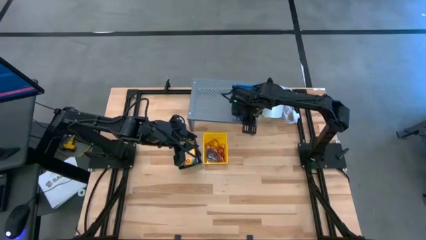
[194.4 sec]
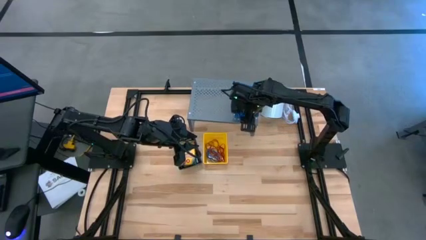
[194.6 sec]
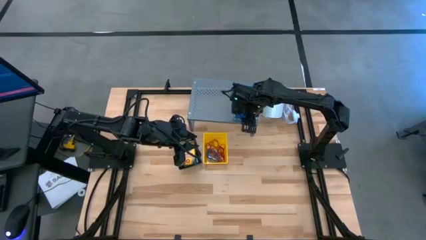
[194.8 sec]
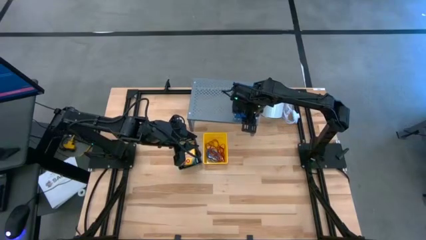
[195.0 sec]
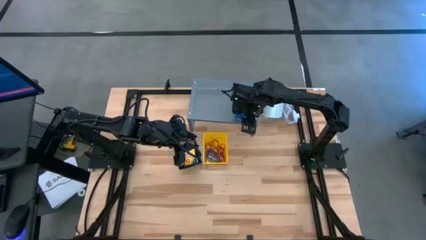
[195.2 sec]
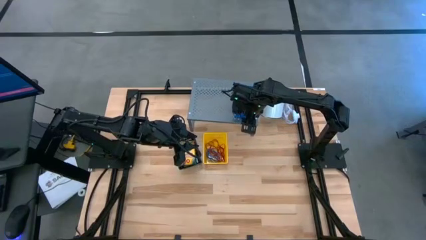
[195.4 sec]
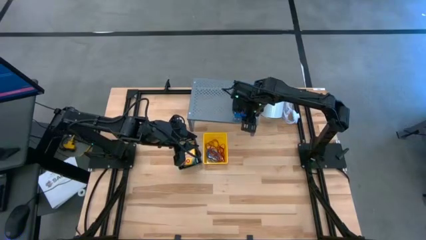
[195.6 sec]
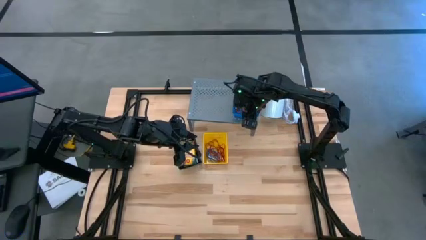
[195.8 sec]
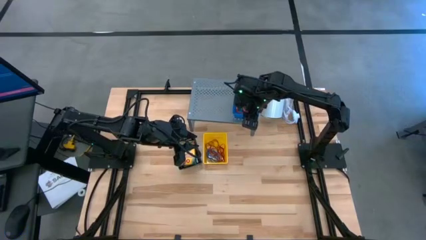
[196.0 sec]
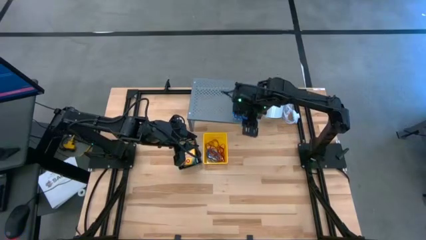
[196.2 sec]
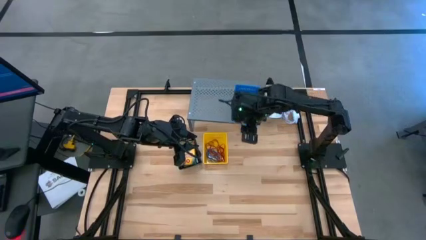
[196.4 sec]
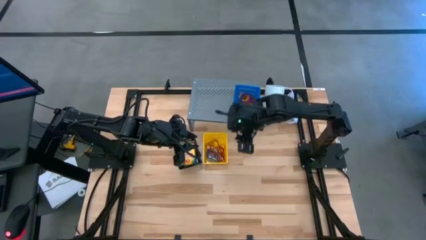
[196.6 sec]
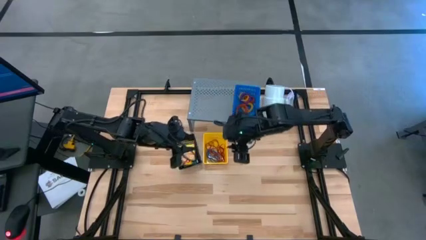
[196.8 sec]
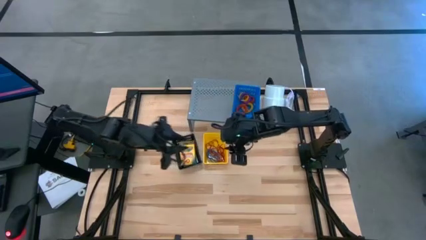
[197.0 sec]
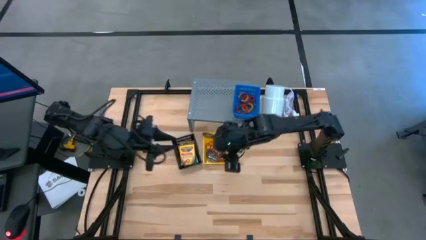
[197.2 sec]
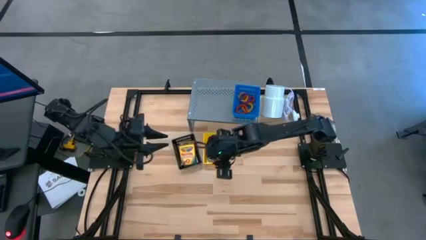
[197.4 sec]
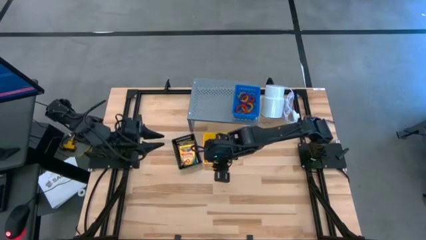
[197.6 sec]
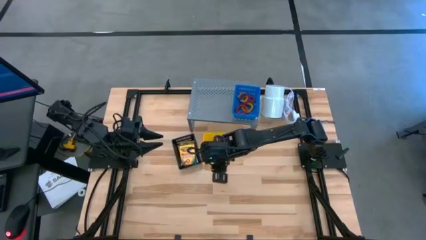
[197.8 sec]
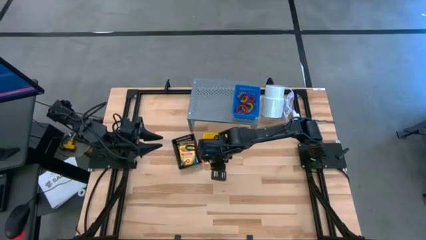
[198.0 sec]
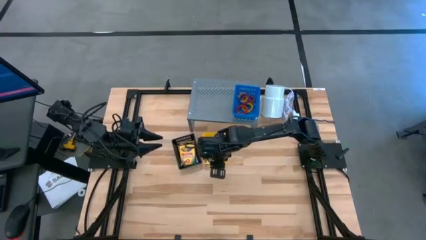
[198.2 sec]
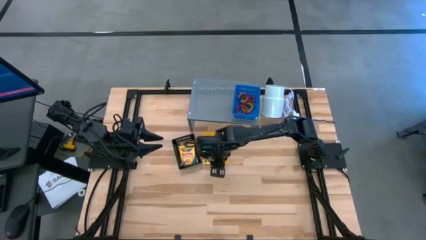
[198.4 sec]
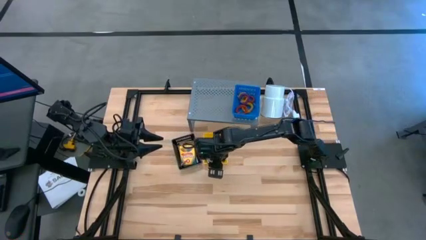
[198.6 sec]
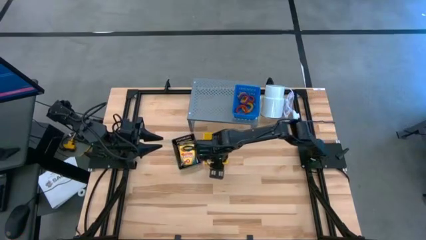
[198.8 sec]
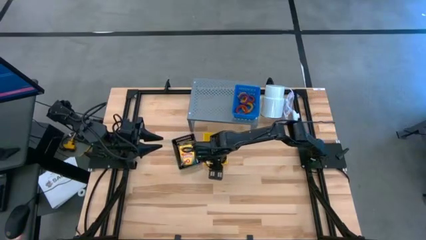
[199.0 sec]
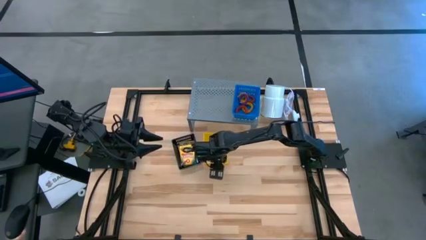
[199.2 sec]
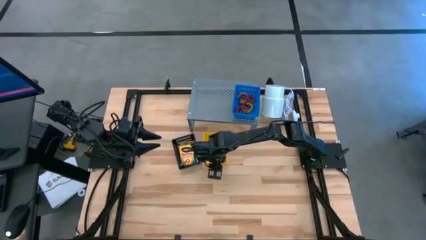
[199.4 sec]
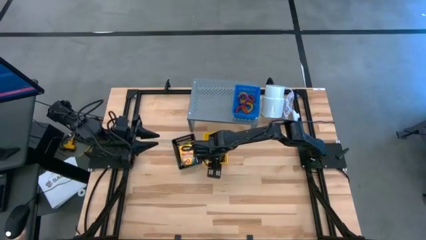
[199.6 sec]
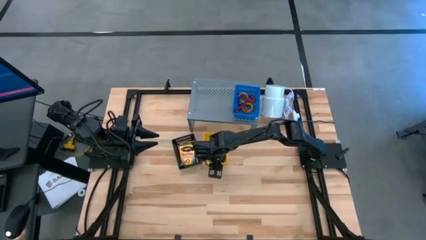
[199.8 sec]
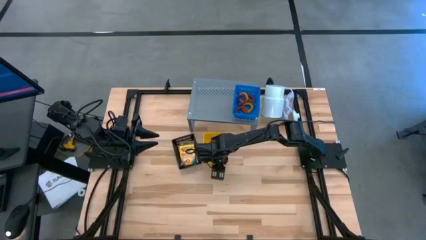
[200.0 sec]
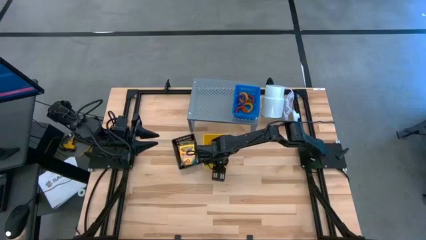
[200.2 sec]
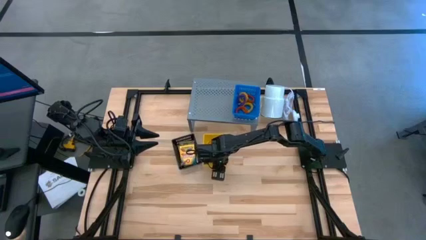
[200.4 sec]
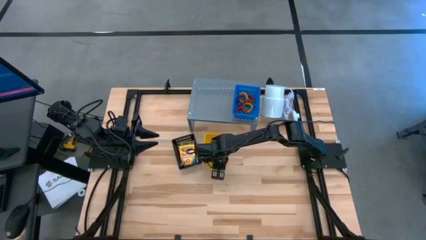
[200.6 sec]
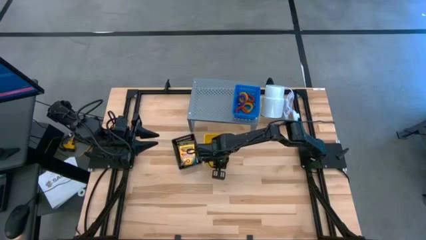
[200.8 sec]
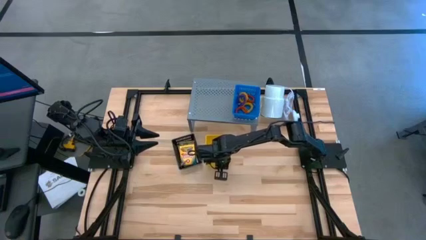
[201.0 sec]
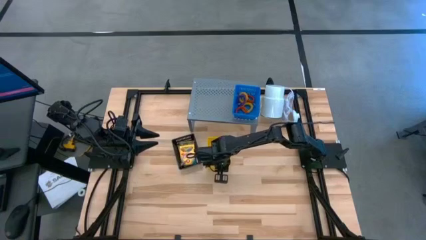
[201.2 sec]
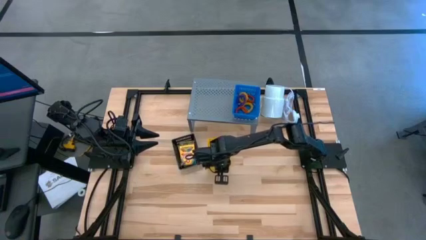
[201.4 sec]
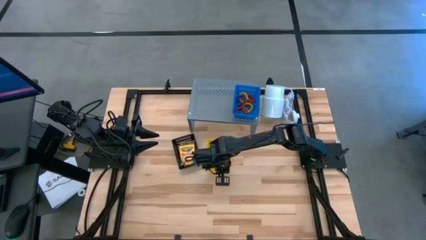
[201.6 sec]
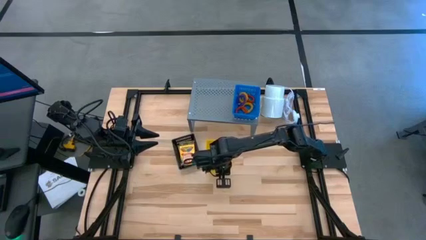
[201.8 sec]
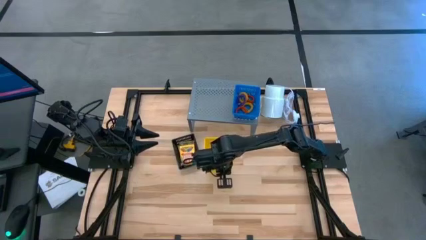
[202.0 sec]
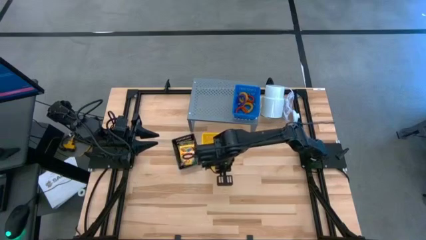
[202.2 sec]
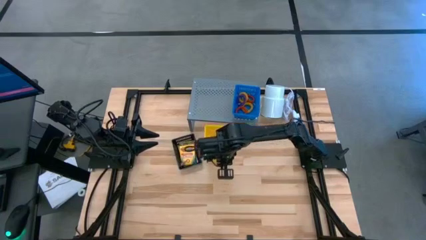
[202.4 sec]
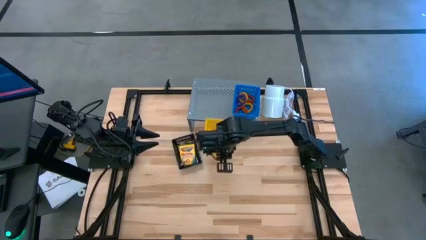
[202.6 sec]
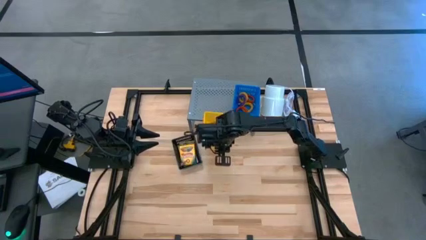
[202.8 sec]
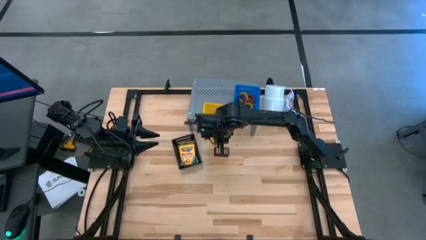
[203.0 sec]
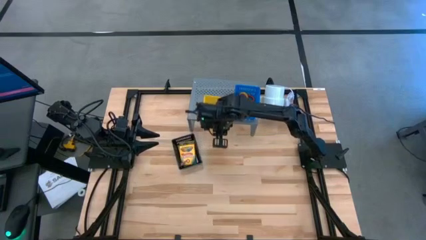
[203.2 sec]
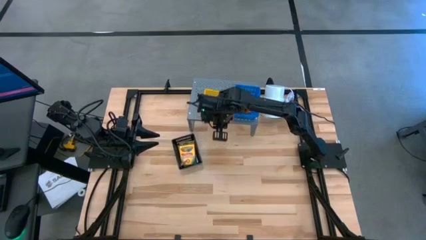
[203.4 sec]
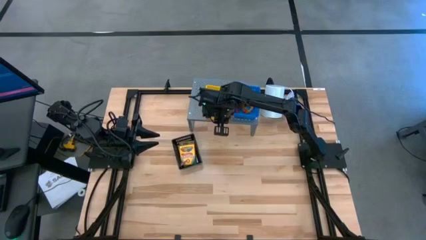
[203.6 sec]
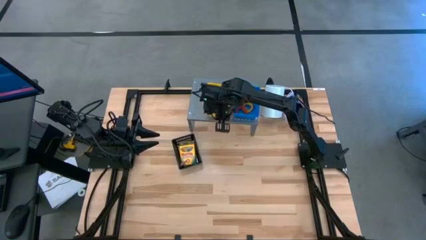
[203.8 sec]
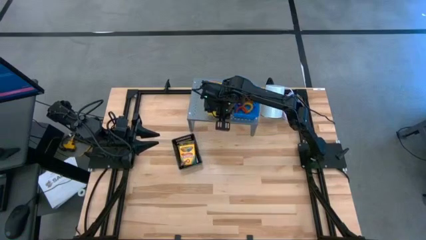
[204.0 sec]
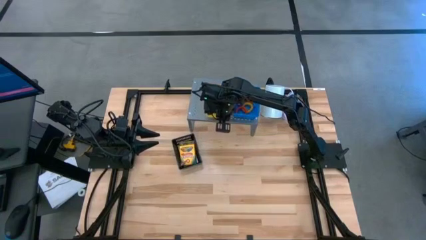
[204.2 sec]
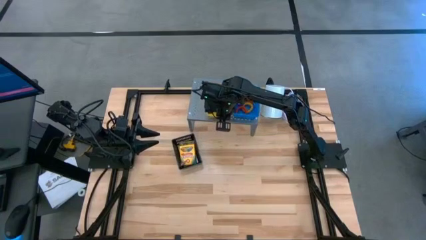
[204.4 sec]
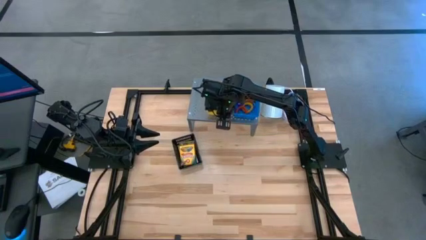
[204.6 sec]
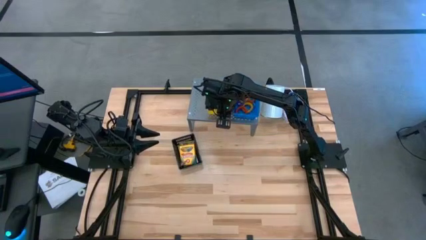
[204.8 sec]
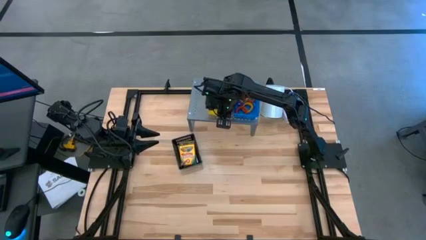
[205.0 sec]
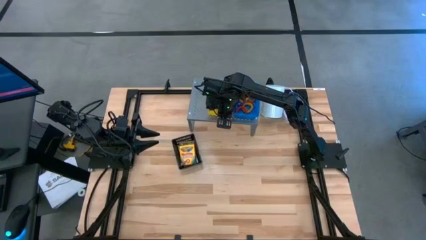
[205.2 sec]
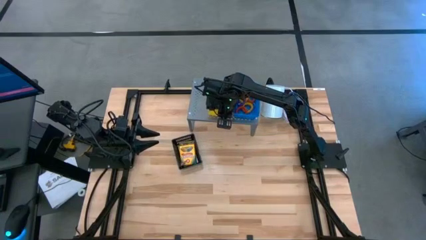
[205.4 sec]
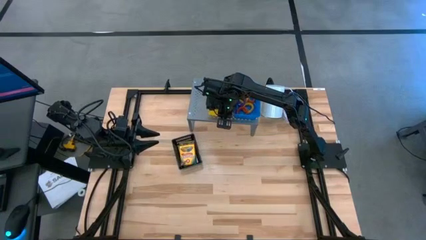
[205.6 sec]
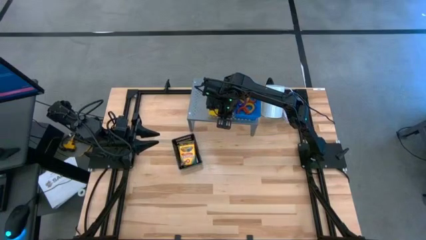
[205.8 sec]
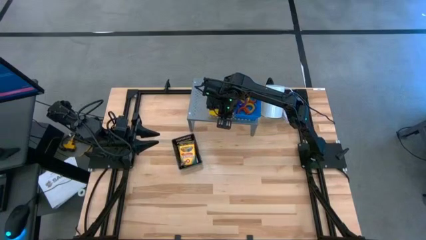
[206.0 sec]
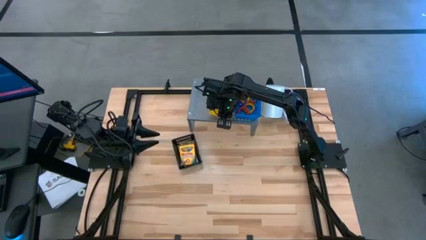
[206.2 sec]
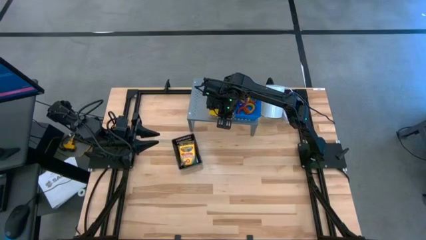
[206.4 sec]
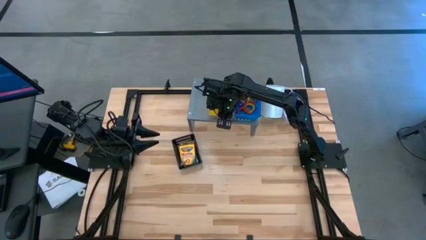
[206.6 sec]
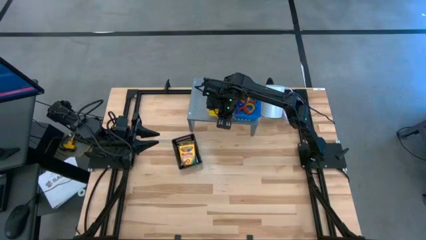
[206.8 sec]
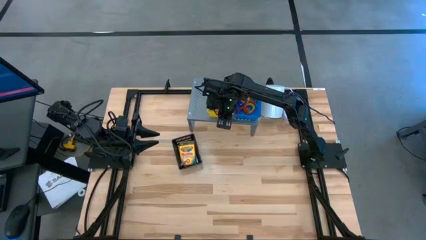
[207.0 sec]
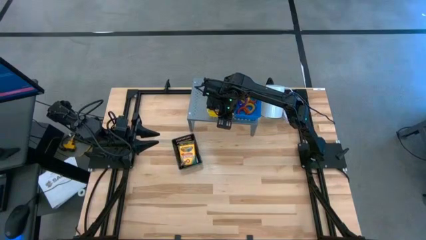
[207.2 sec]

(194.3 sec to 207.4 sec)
Task: Pick & Place Office Desk Supplies
Put the yellow basket on the shelf

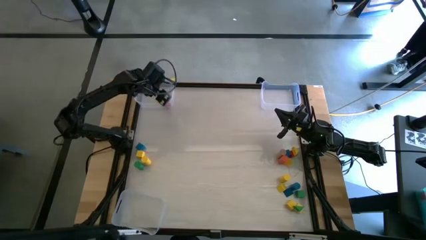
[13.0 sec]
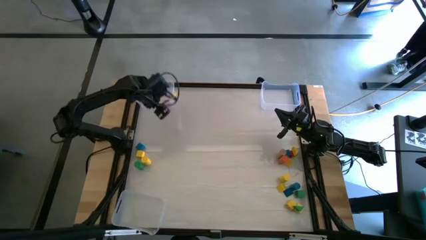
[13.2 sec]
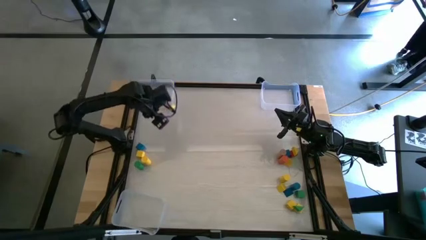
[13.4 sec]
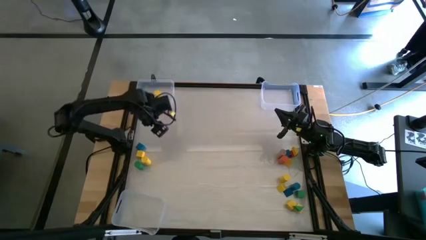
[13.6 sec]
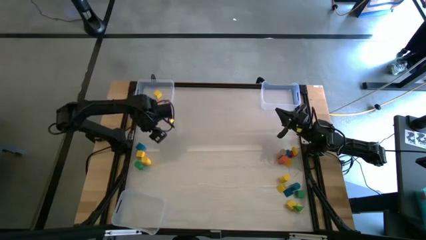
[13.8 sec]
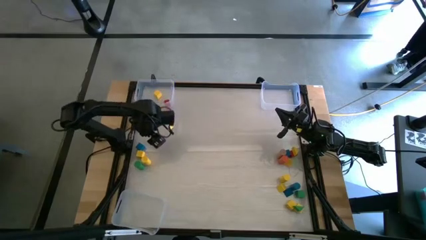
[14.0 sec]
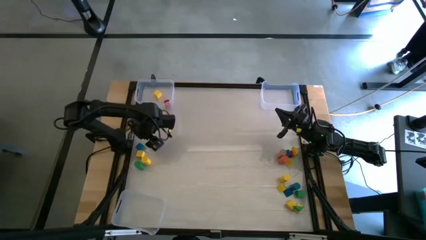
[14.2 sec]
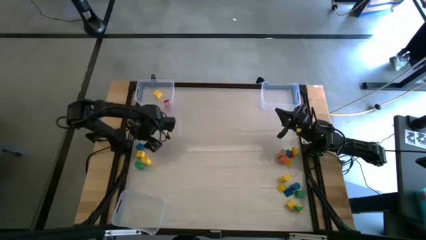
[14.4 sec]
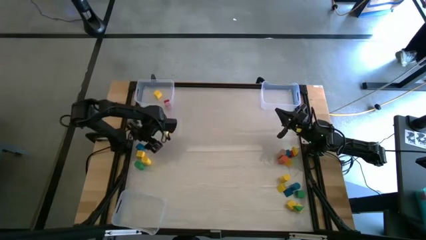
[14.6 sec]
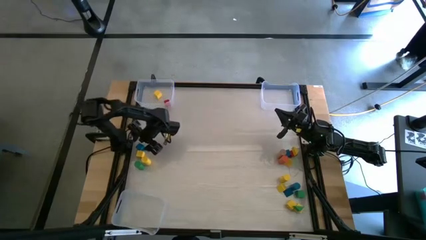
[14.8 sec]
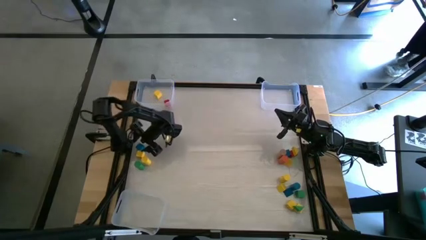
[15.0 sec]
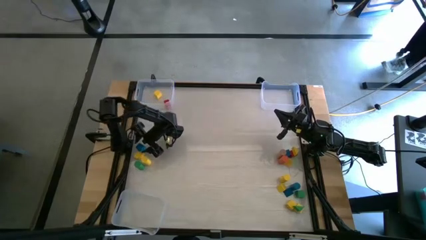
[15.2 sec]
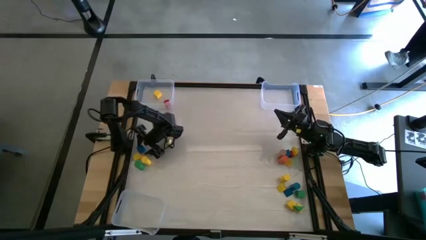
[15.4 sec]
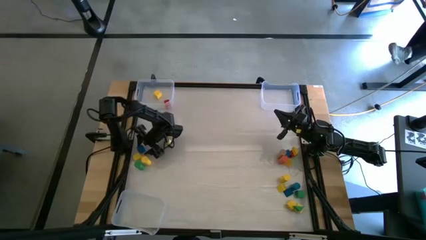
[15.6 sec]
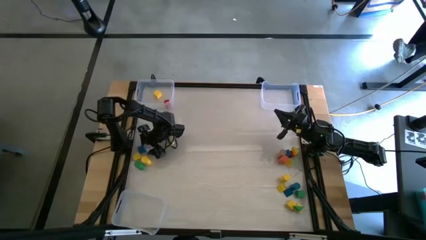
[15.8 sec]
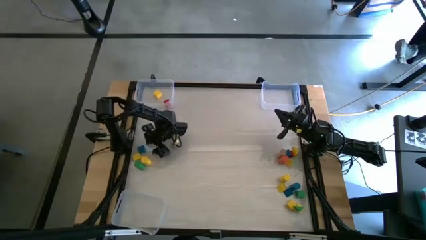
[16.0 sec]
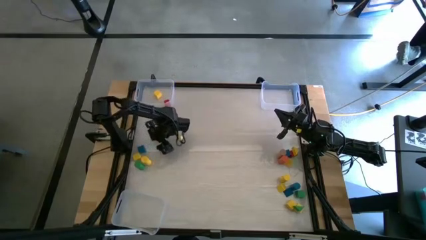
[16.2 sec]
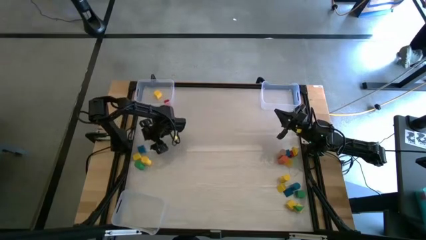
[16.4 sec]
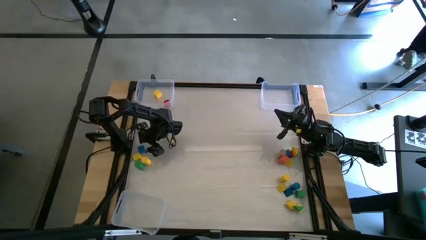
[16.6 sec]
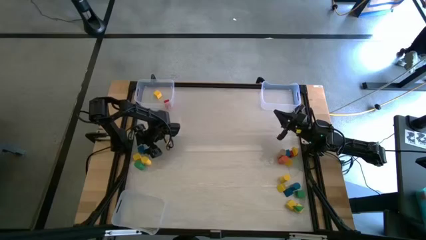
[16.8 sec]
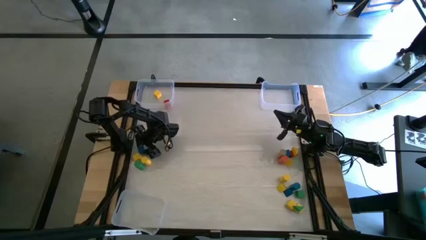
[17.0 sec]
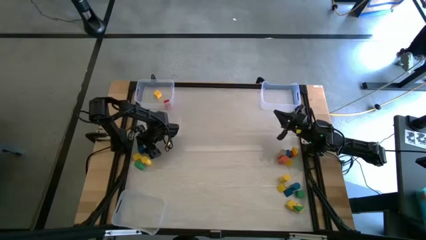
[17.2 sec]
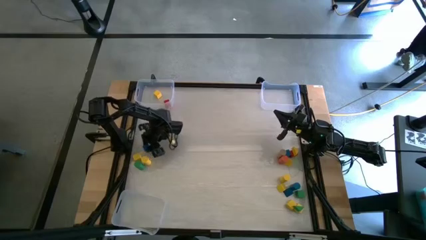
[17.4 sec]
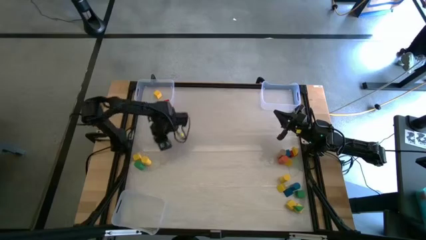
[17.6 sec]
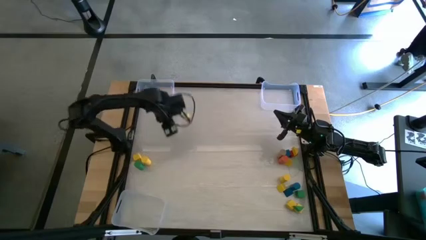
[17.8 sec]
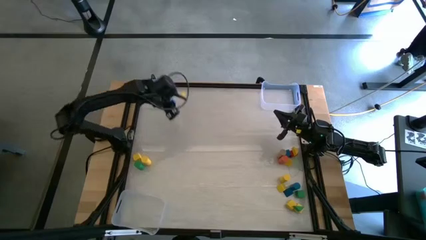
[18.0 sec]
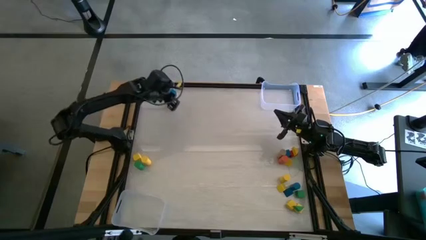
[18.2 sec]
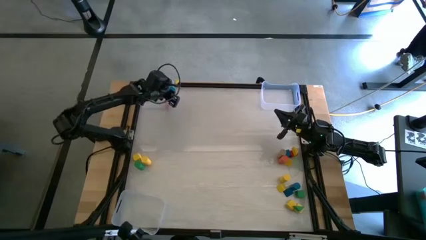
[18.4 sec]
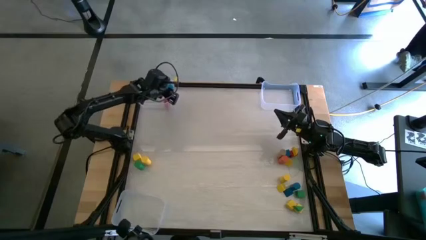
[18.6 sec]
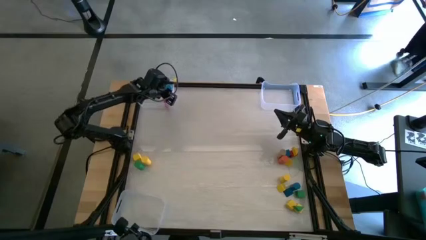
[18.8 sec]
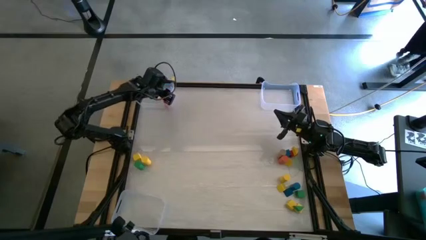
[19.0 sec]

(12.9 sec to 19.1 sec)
Task: Sort blocks by size
Put the left blue cube block into the top left transparent bin
